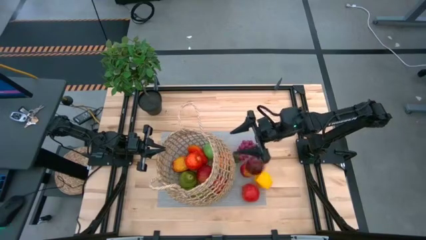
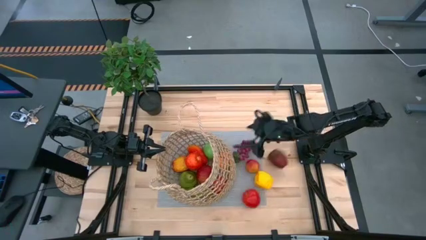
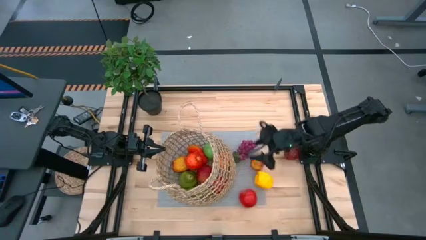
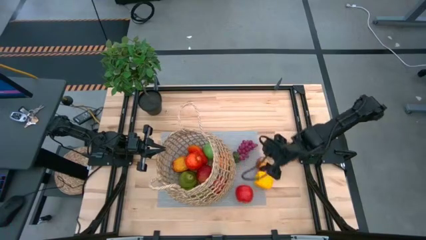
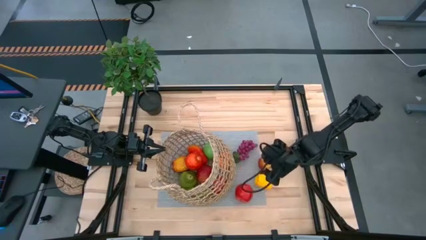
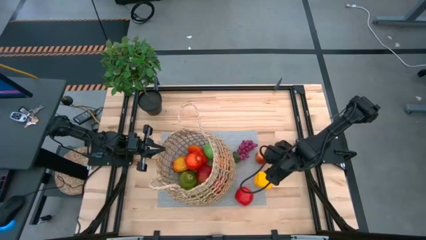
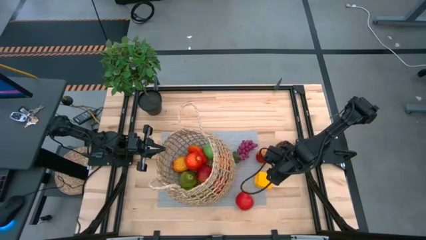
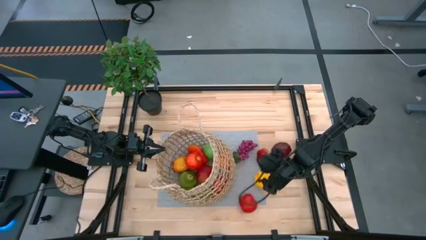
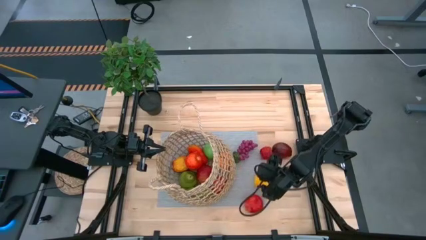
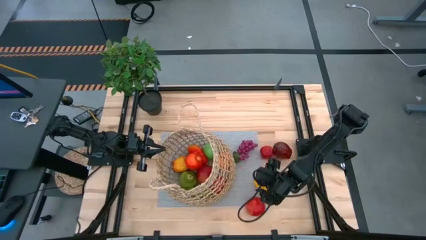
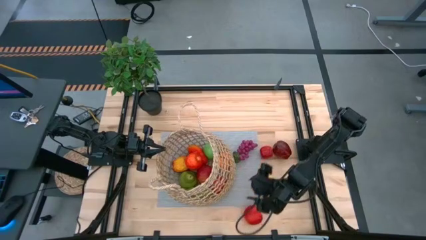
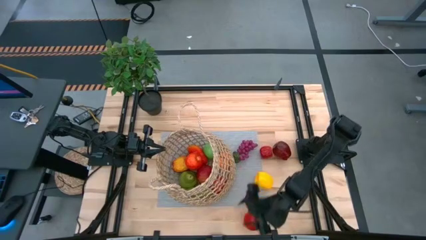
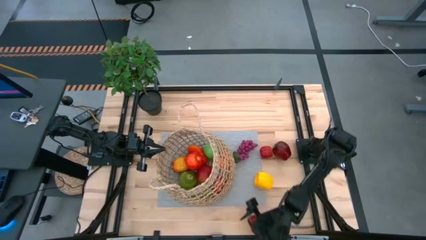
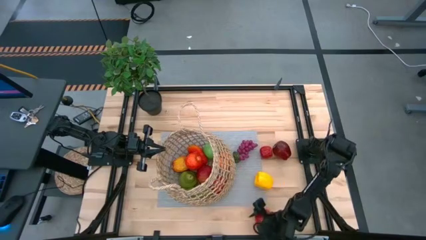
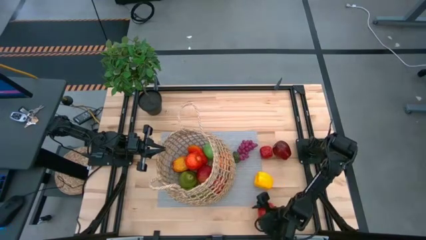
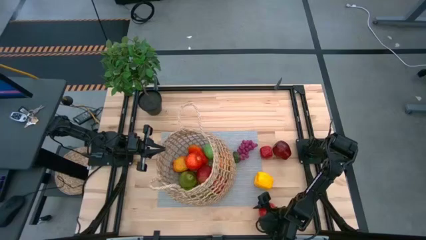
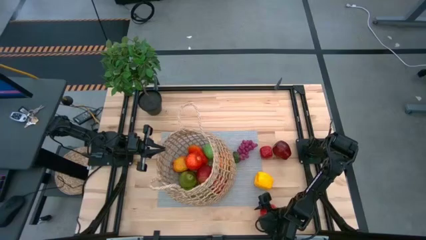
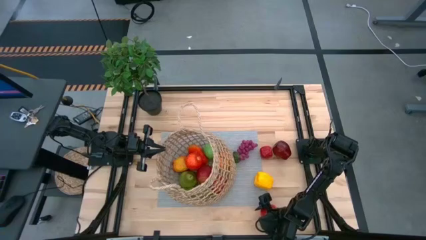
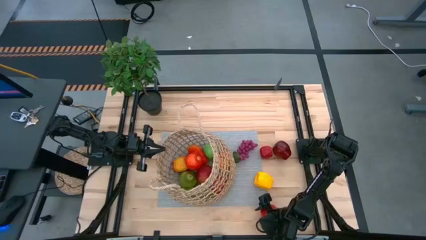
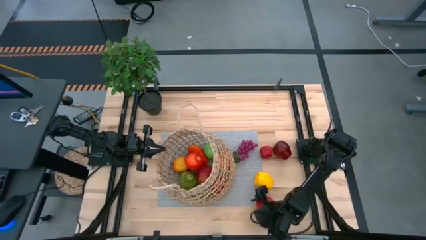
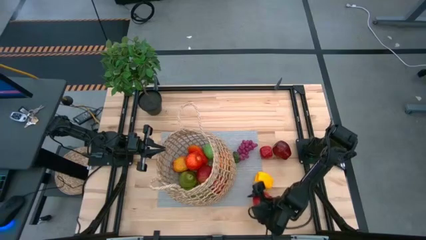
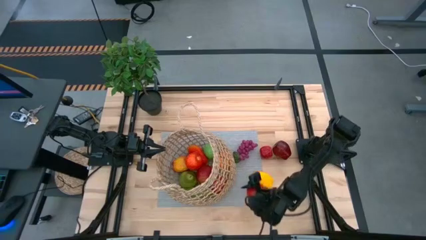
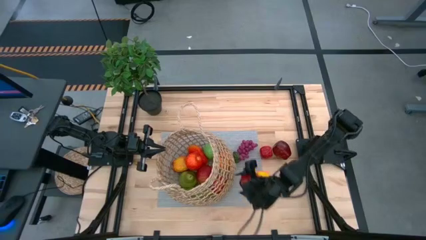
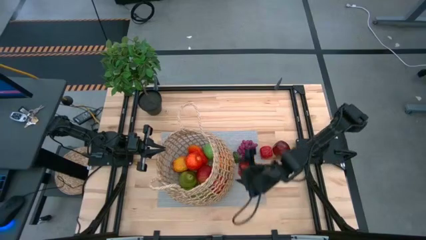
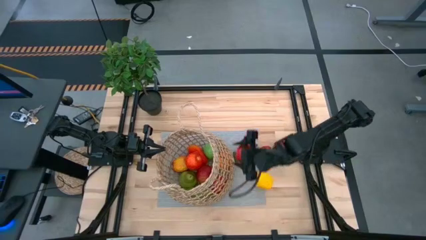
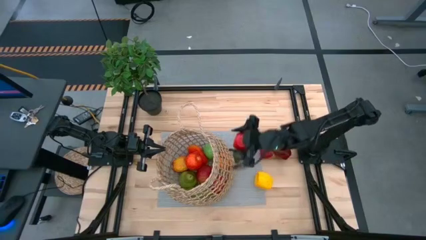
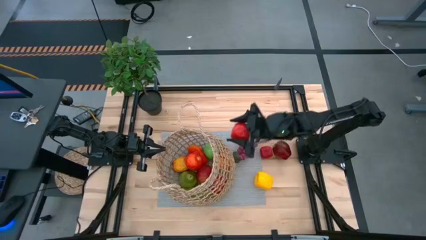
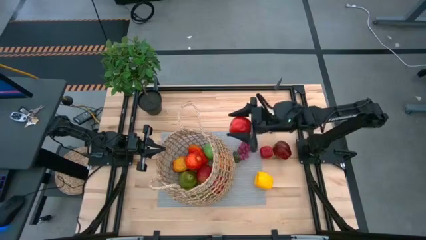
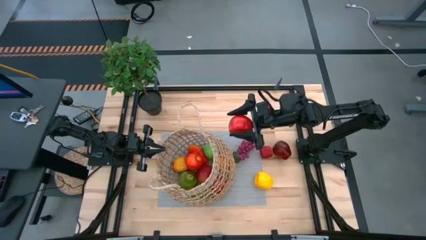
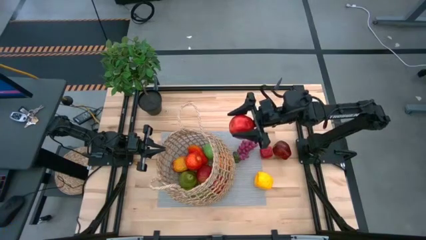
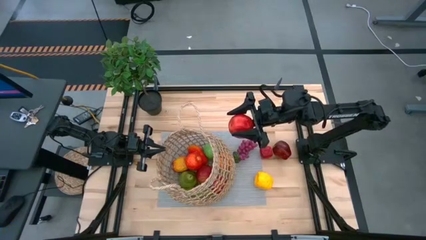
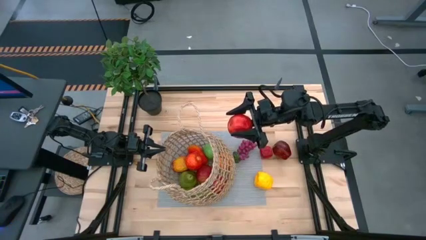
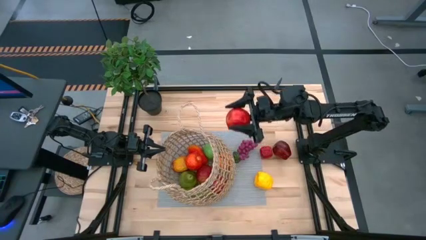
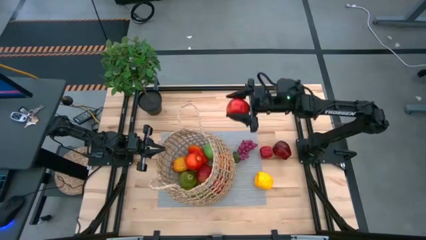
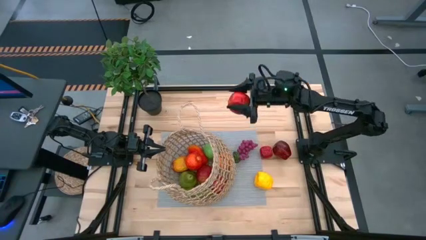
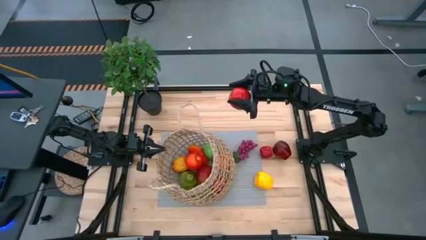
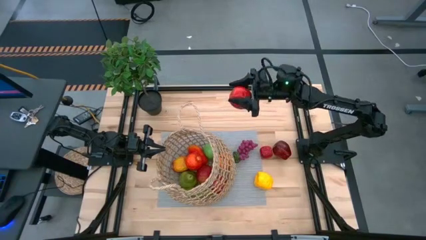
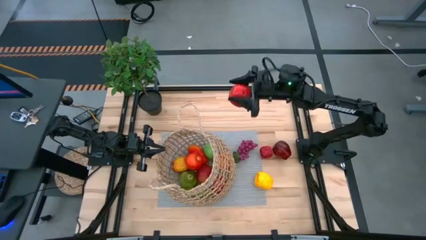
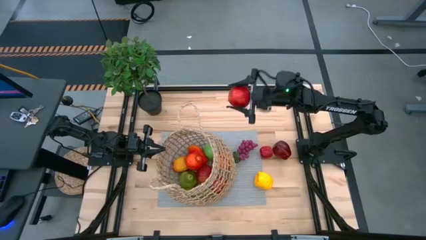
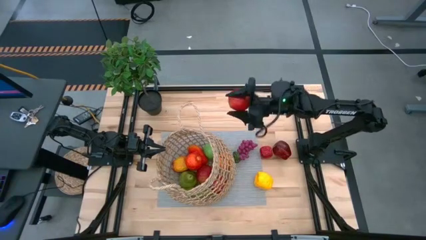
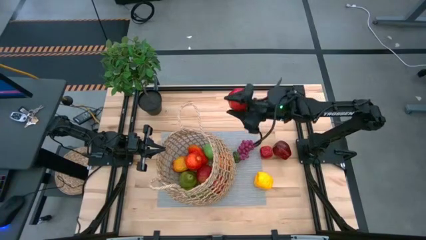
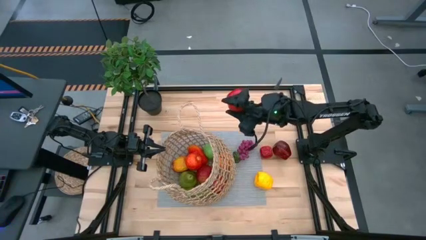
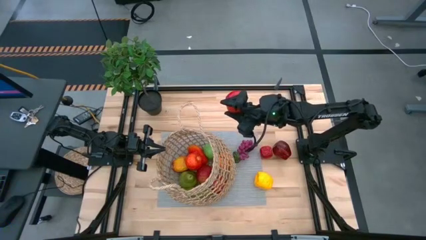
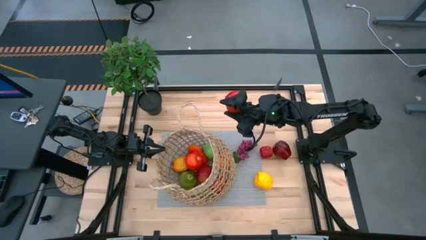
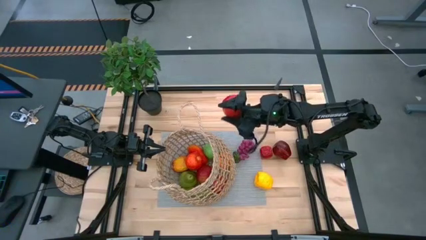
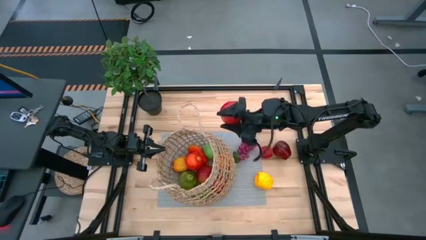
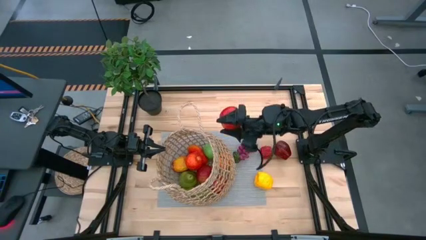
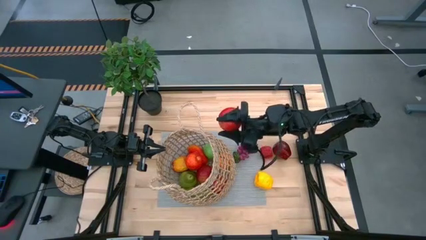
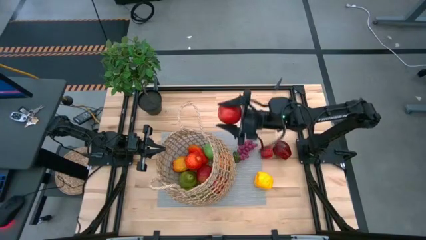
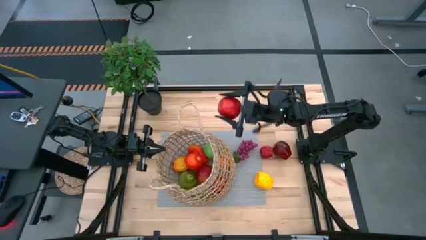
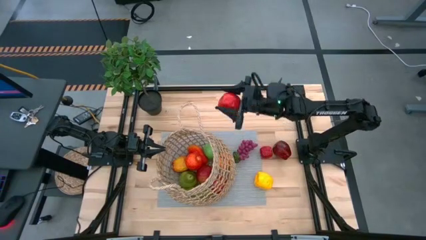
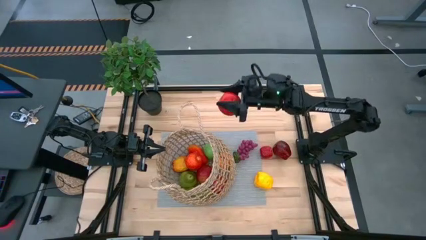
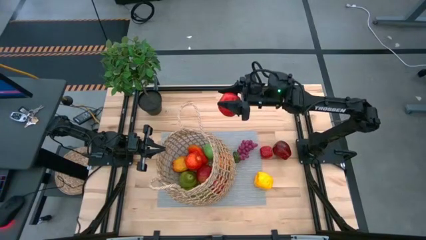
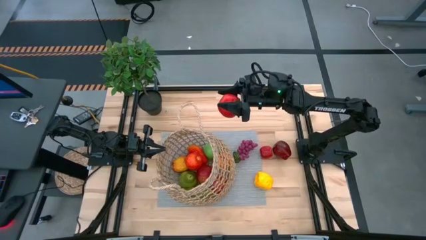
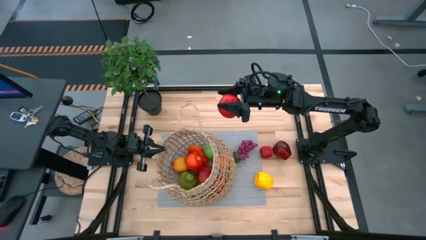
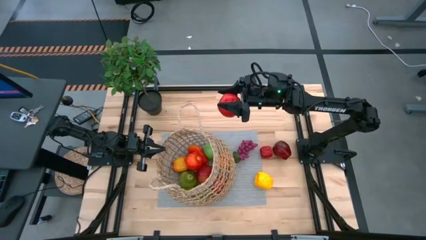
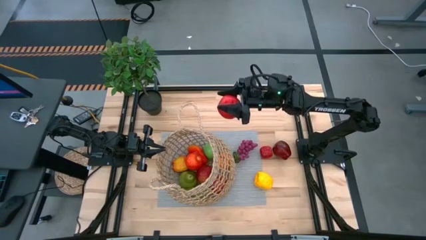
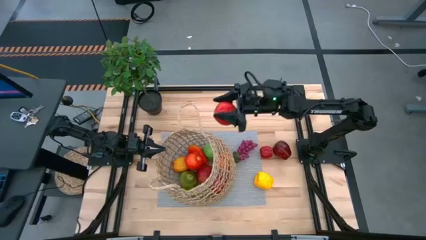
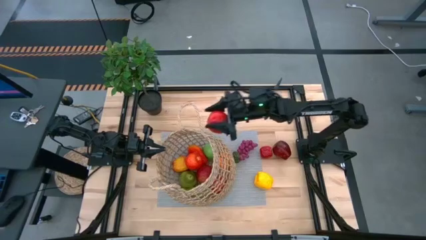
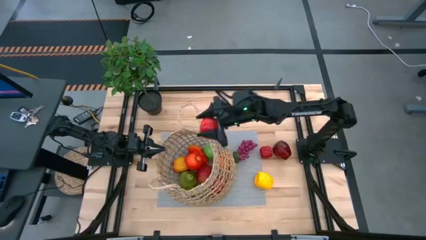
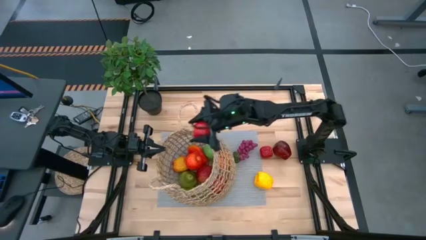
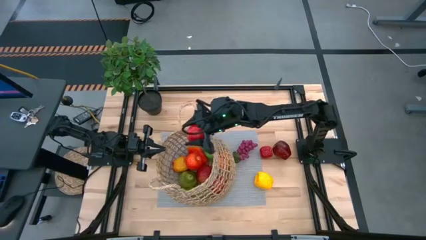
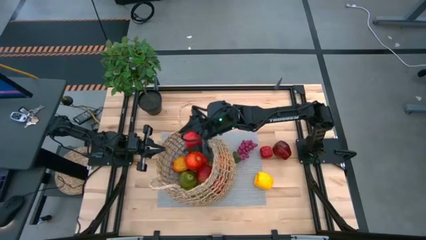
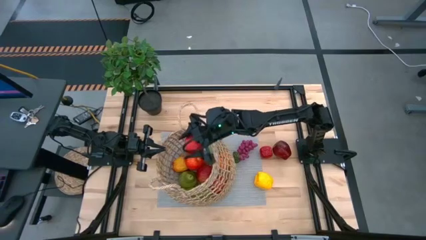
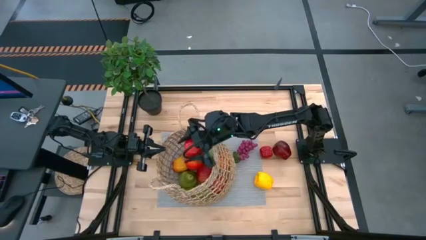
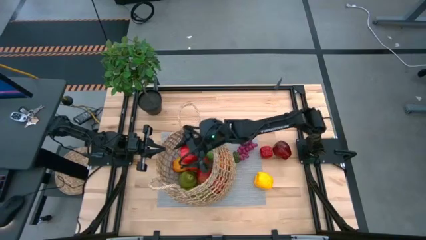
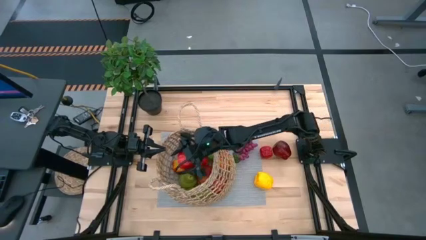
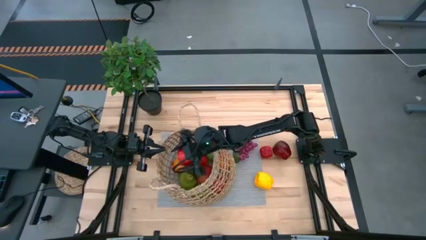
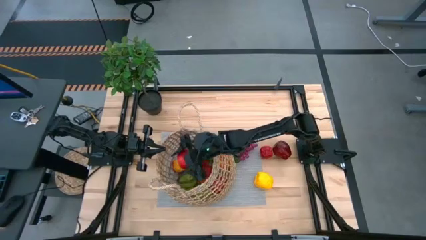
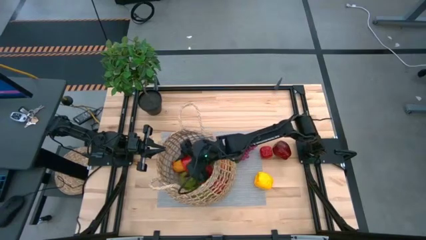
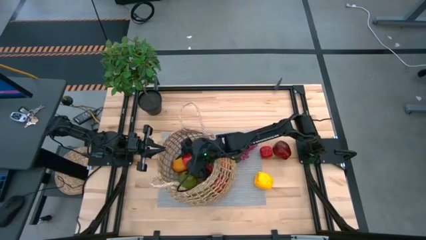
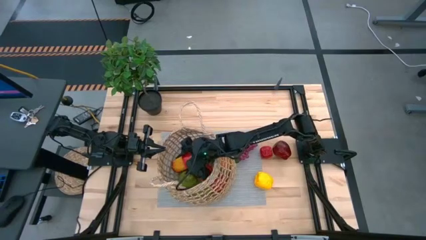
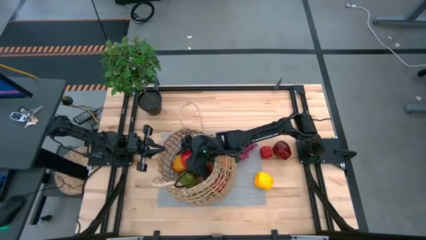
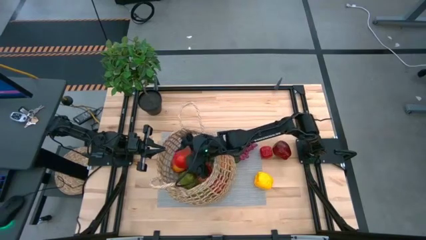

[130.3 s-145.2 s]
Task: Build produce basket
Put the red apple into the brown basket

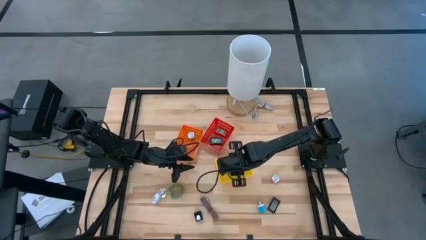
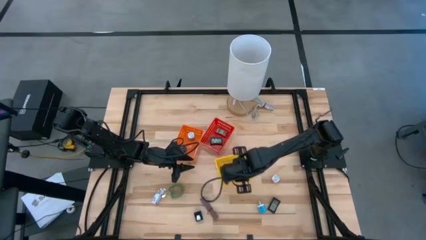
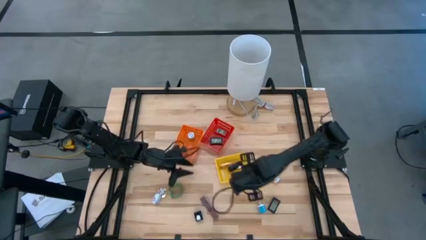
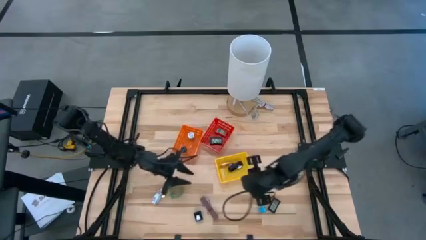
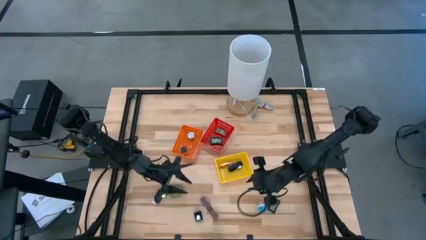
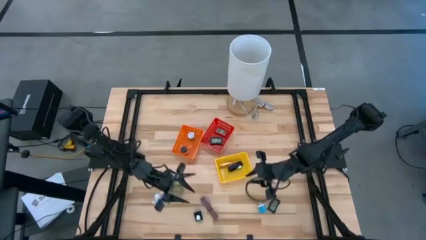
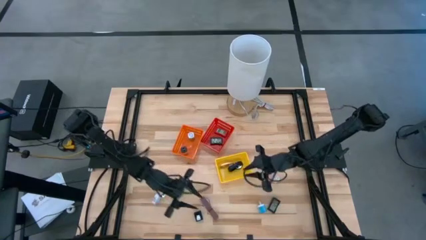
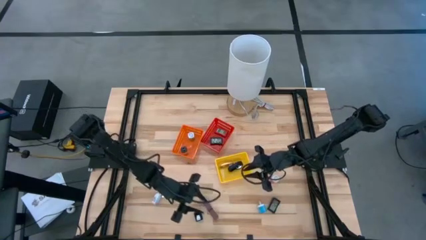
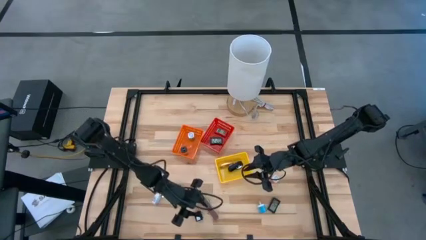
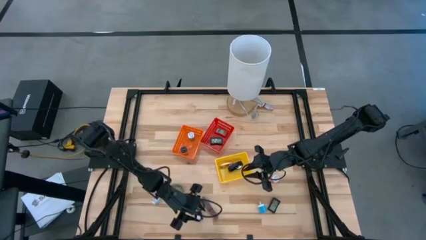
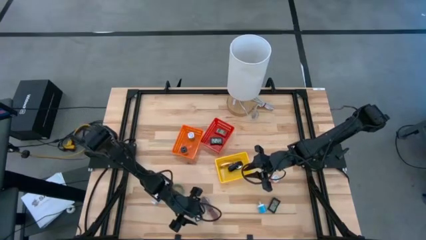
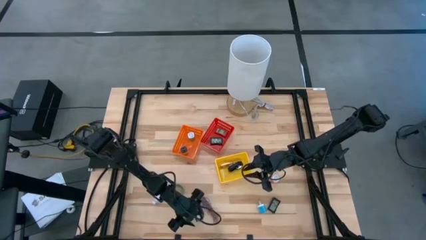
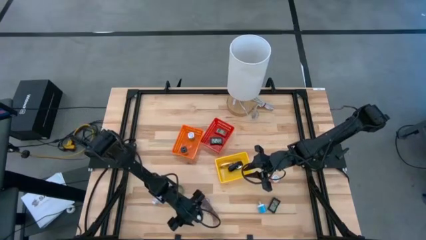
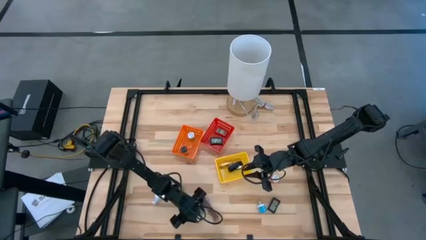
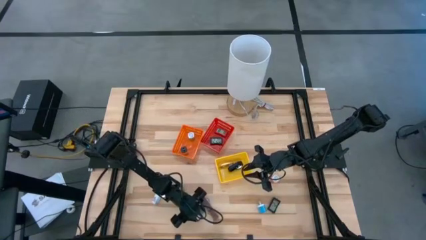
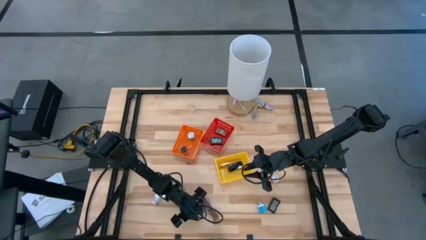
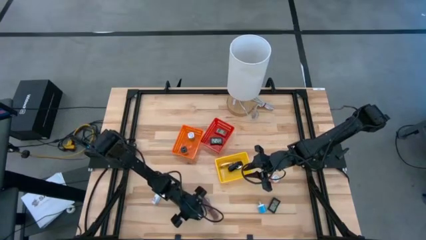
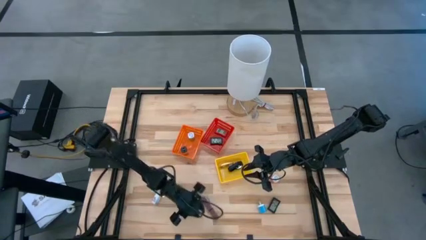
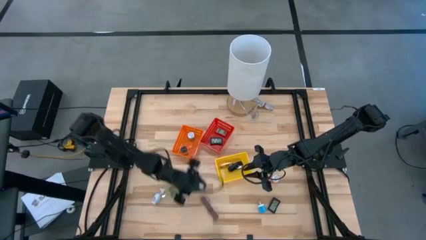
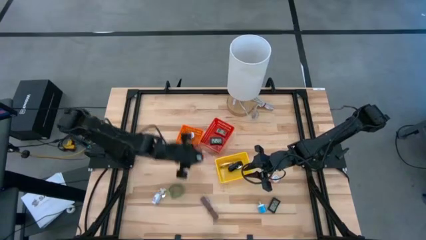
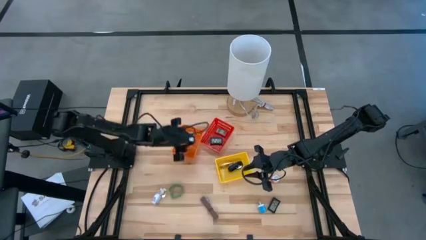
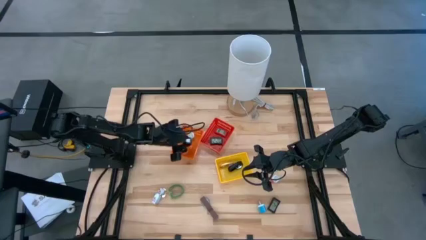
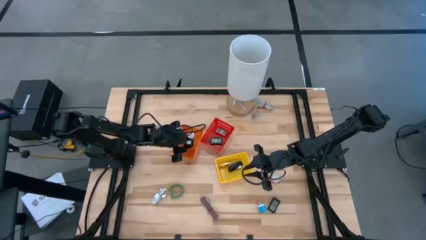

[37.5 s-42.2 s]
Task: Pick & Place Office items
Put the black charger adapter into the orange bin
